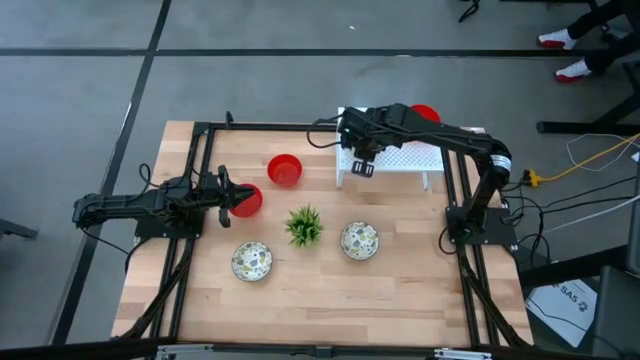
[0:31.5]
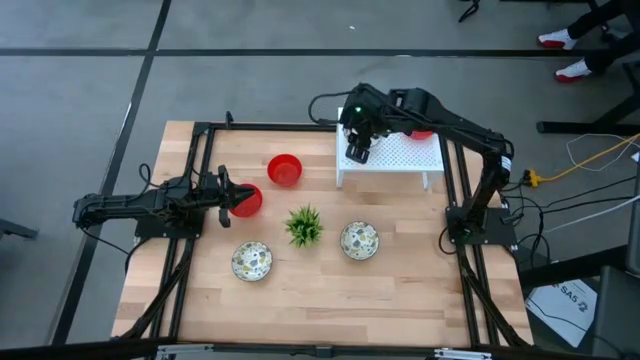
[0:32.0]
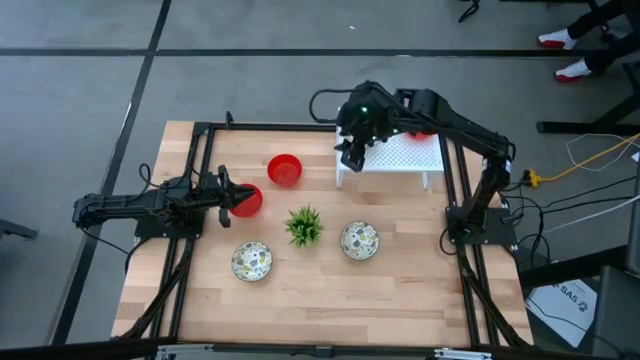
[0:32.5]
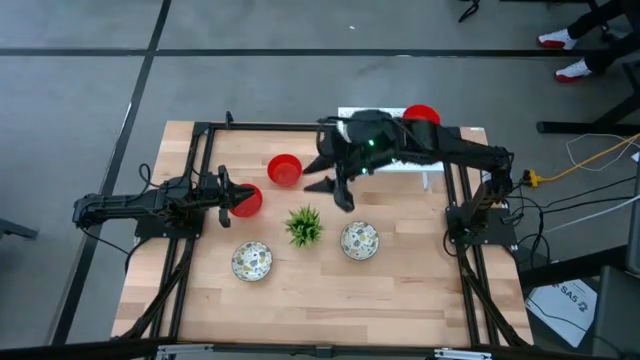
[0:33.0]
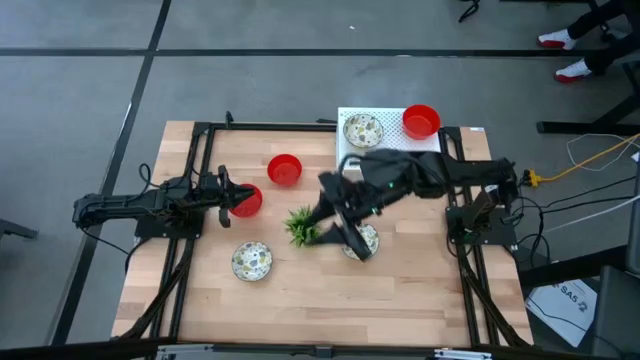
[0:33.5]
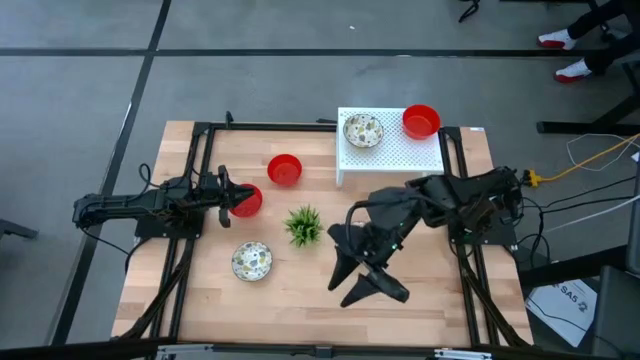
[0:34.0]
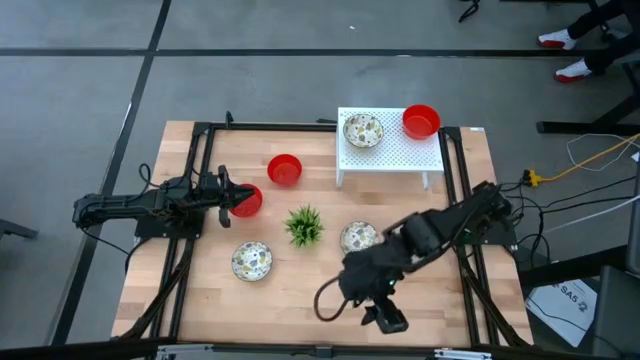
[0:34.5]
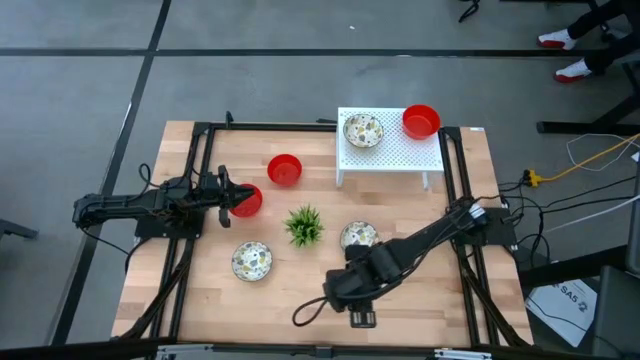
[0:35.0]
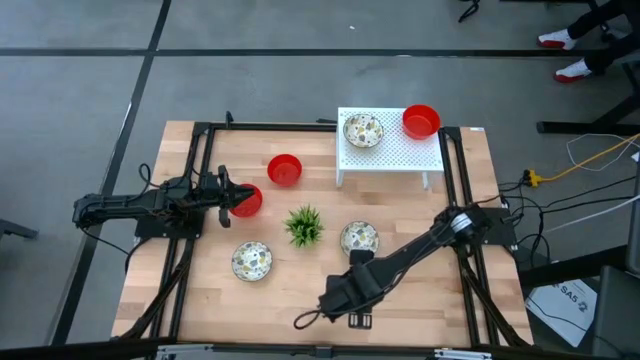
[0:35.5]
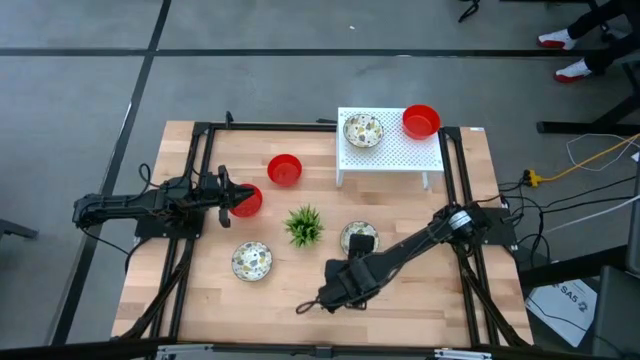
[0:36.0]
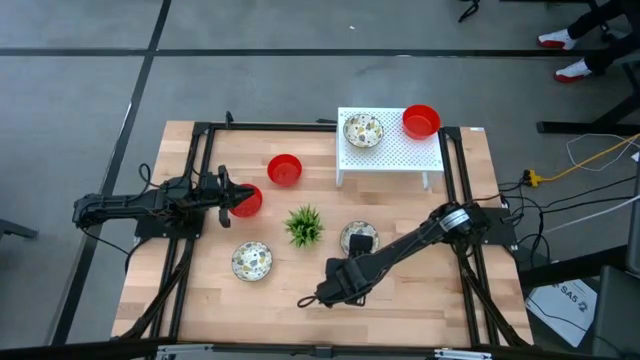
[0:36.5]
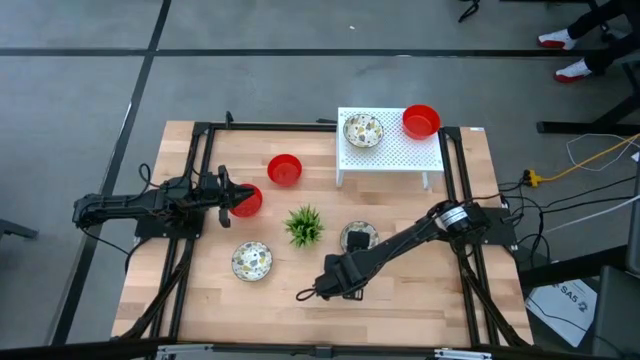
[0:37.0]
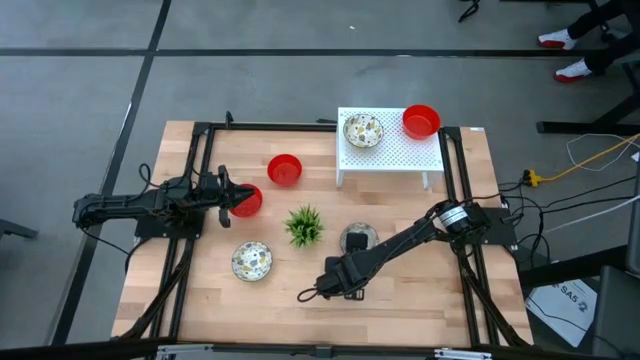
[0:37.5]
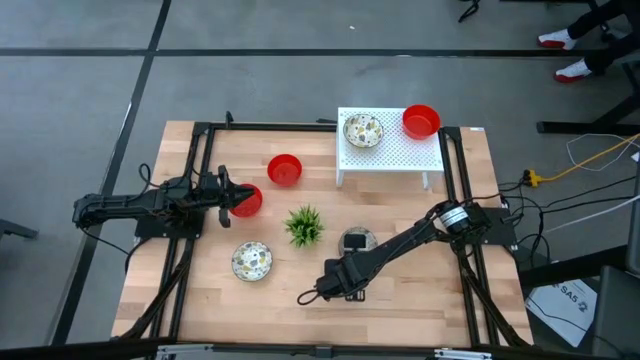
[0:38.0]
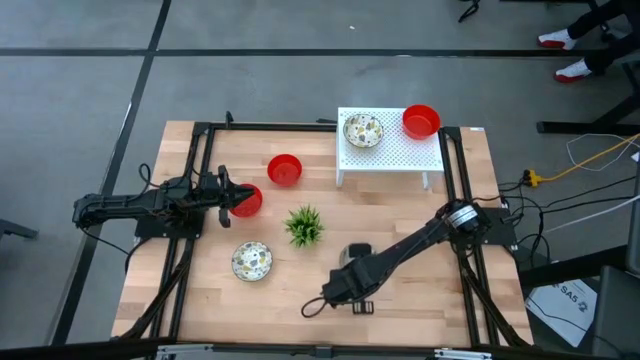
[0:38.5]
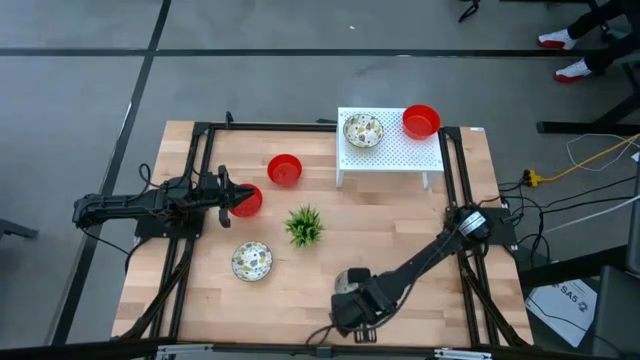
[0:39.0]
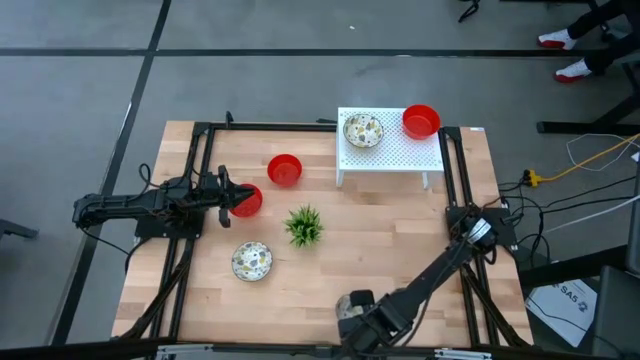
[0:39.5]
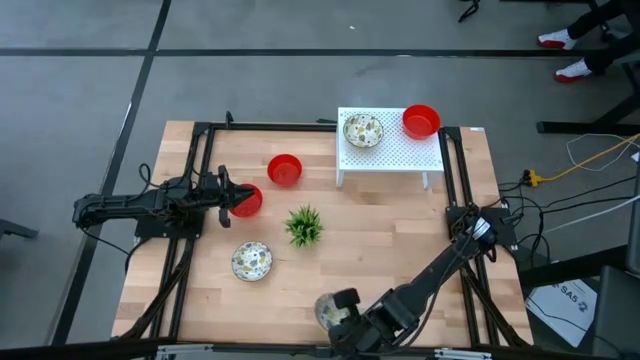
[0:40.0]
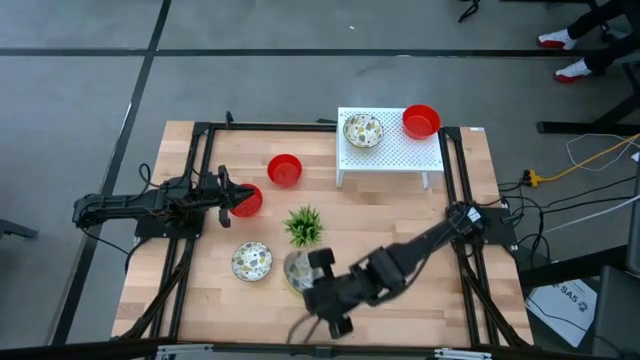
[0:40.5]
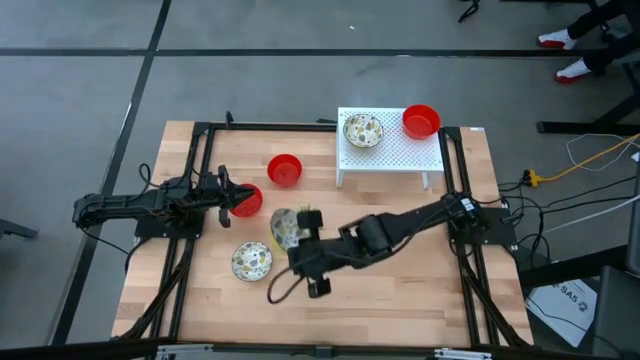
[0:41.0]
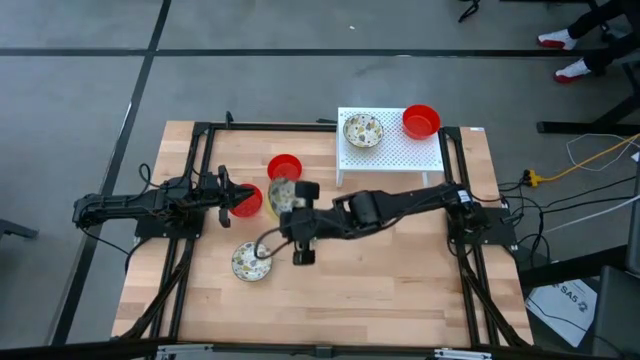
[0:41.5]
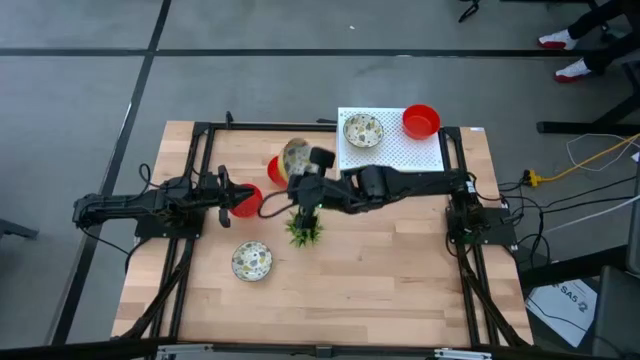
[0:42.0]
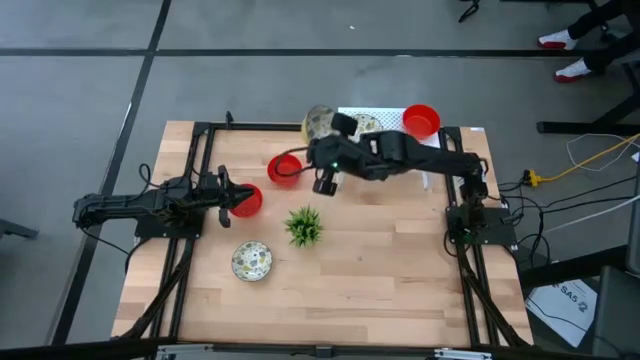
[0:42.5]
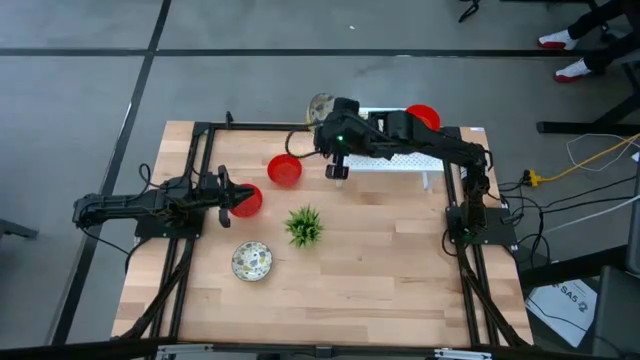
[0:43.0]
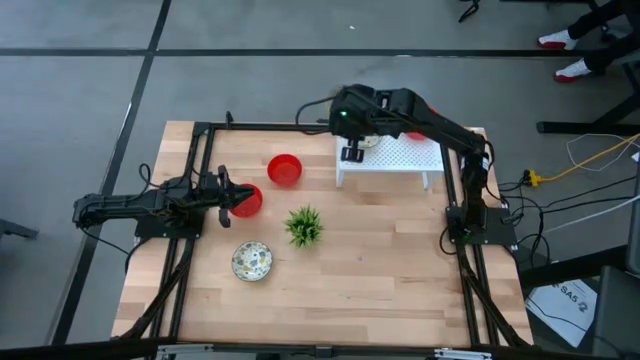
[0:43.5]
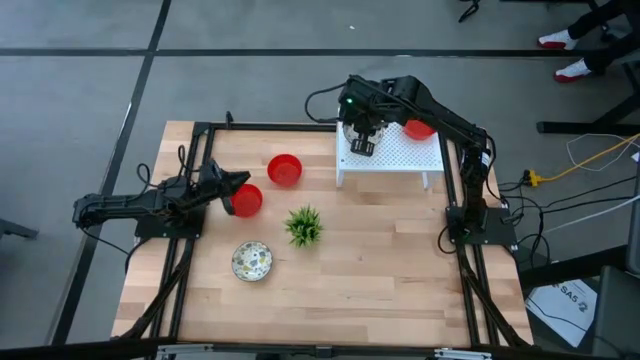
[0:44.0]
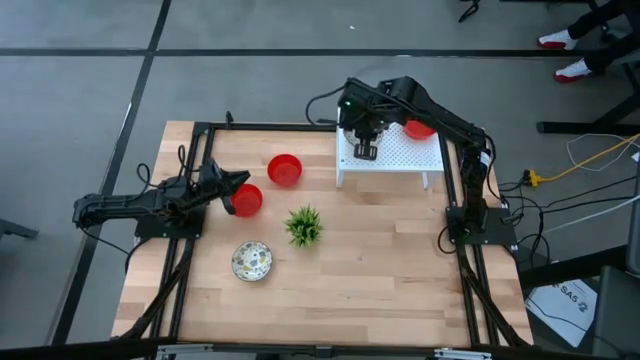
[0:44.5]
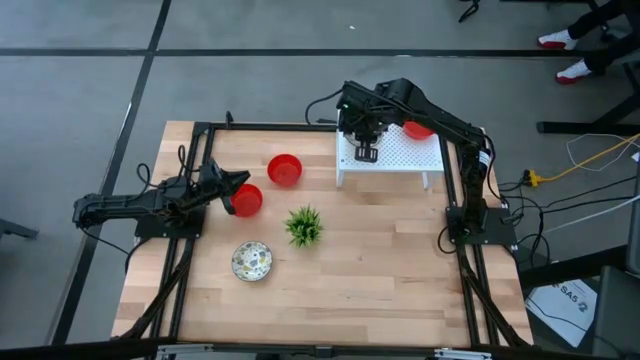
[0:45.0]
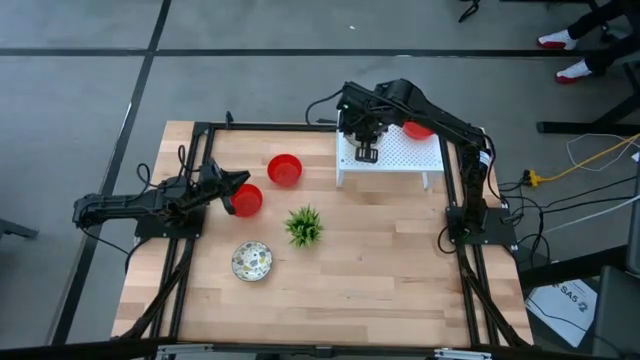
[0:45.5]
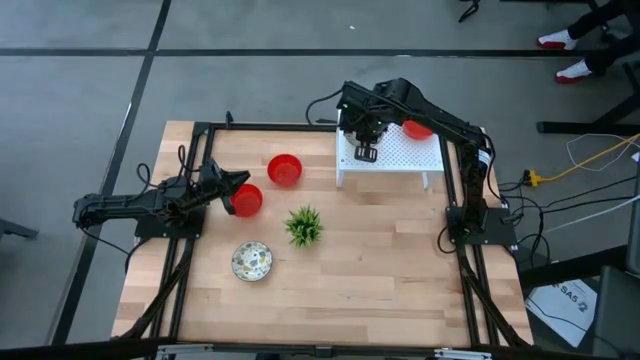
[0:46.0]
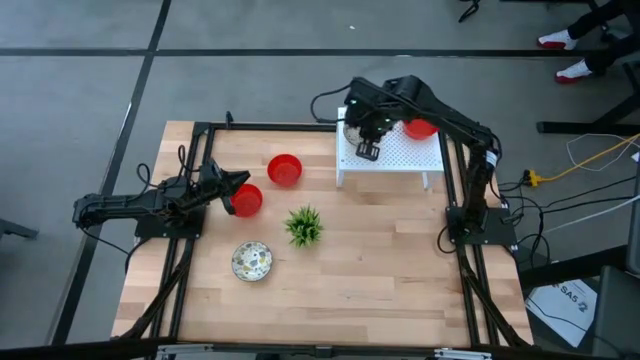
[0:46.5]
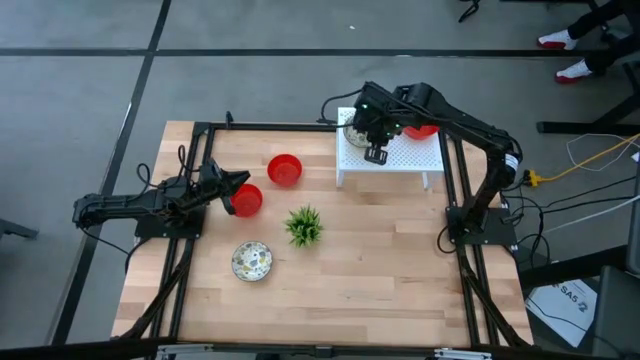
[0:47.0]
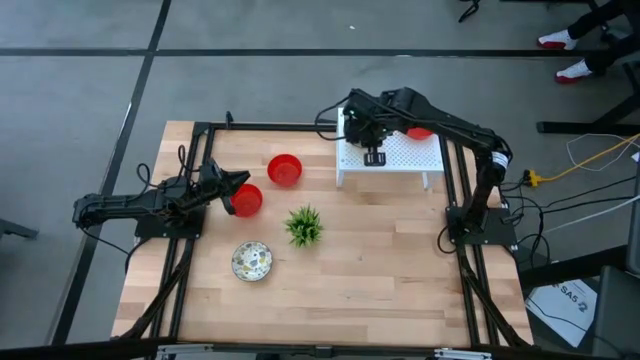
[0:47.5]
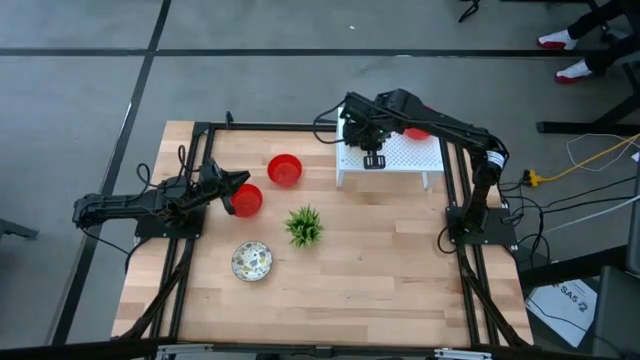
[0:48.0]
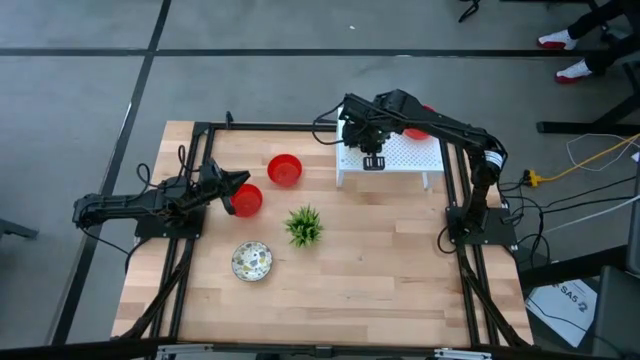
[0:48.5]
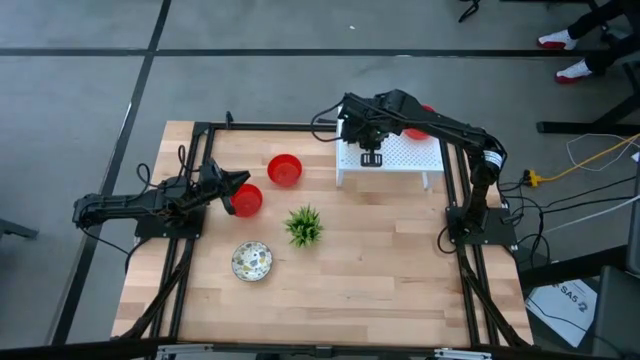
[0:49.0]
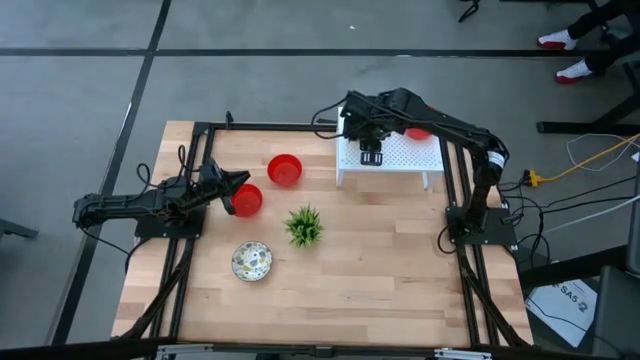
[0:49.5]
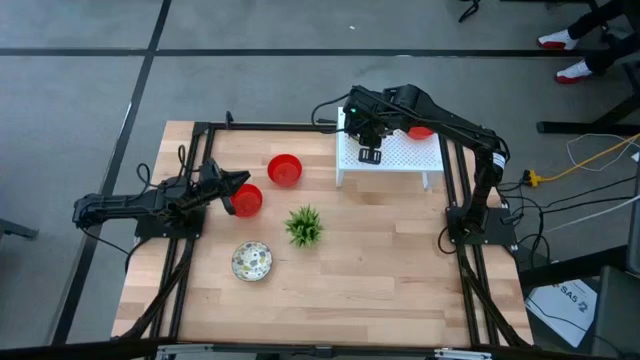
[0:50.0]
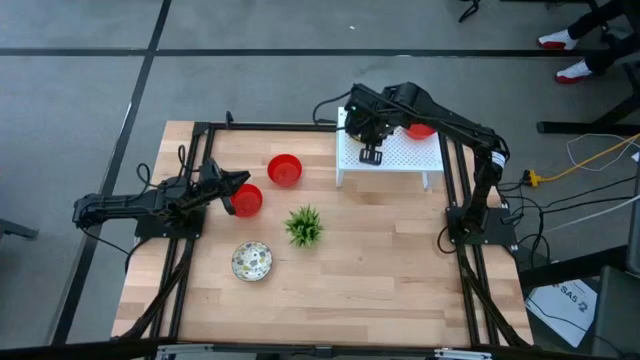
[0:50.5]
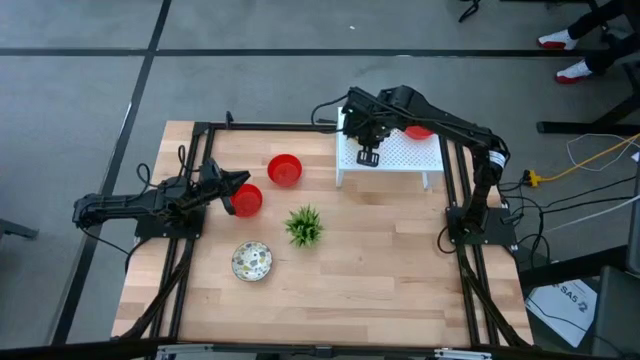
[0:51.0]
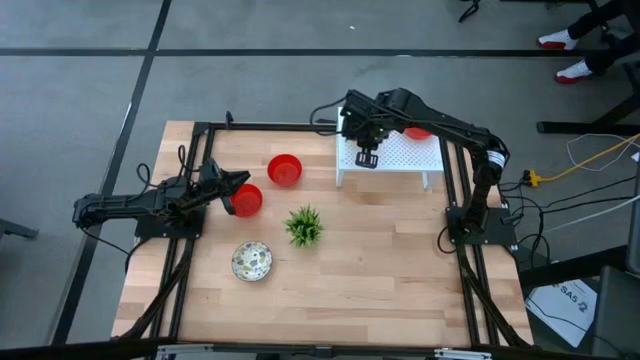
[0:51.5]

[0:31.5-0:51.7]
Task: Pick & Place Mini bowls
Stack the right white bowl on the white bowl on the shelf
